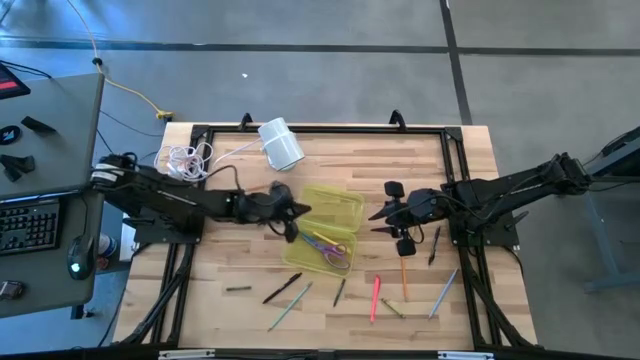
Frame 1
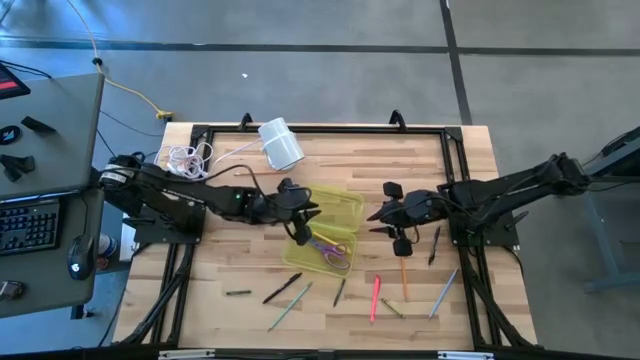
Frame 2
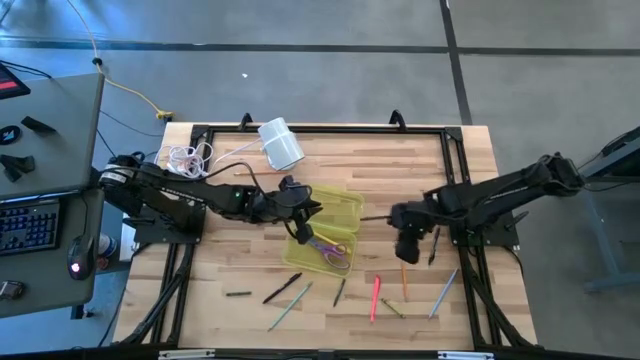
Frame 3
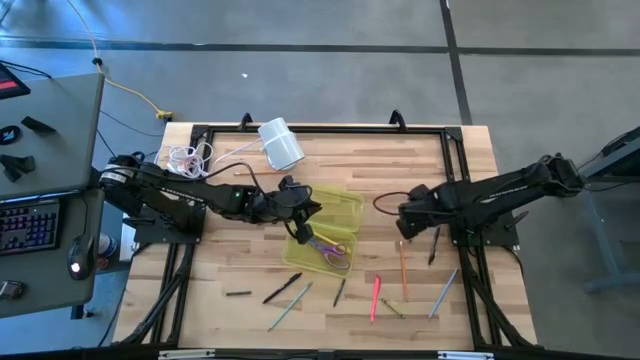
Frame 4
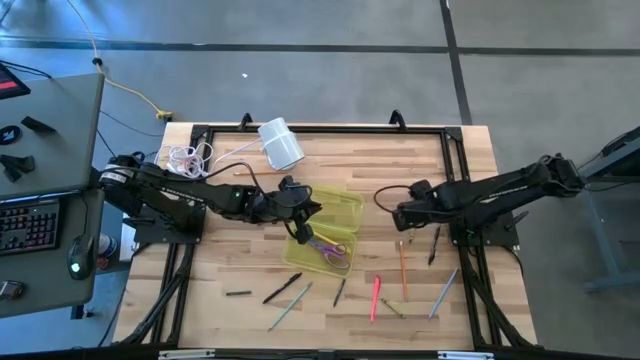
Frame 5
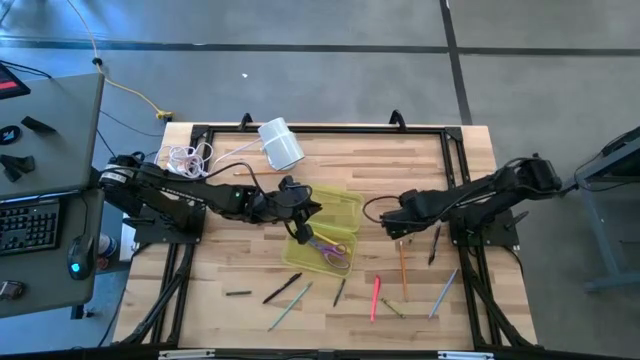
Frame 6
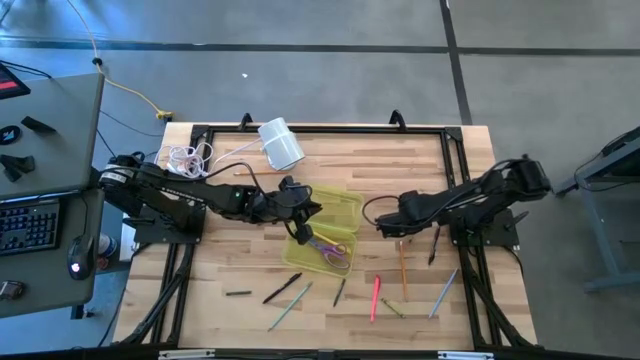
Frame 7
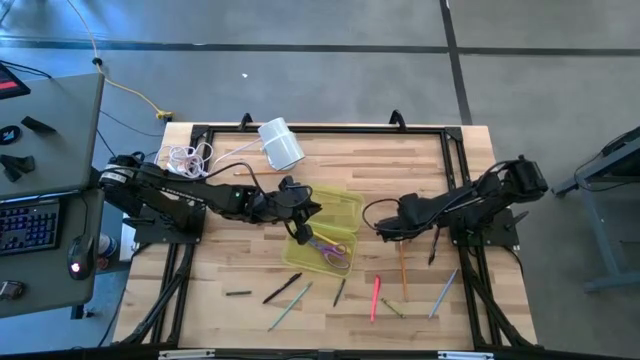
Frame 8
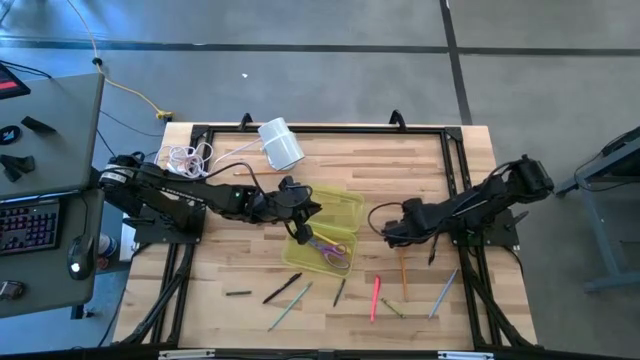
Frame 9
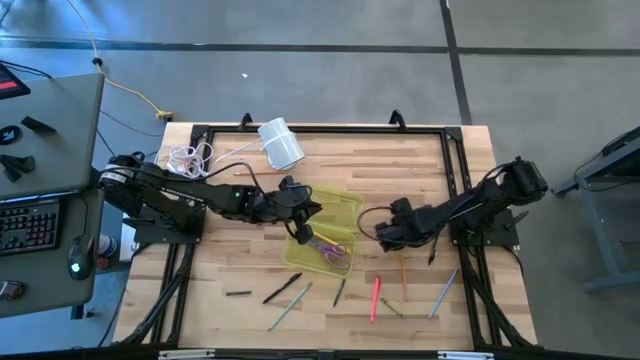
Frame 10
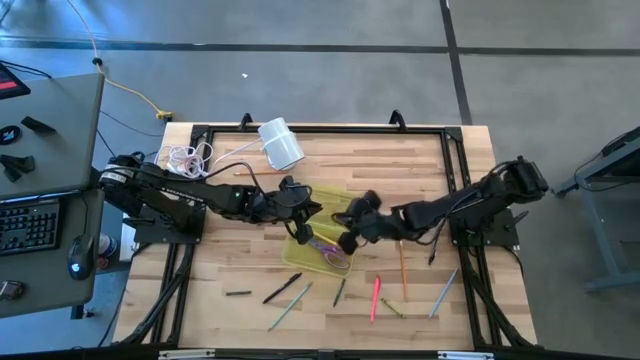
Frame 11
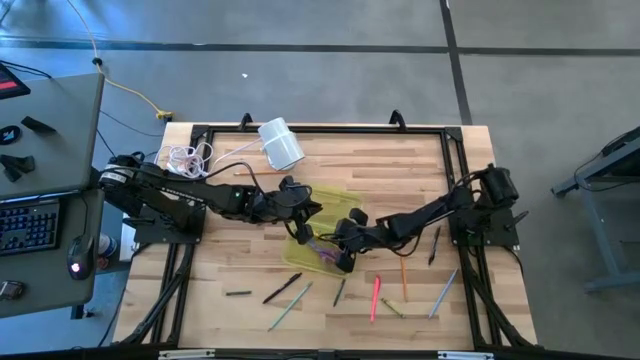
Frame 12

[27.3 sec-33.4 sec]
Task: Pick & place school supplies into a supply box
Put the top green crayon into the supply box

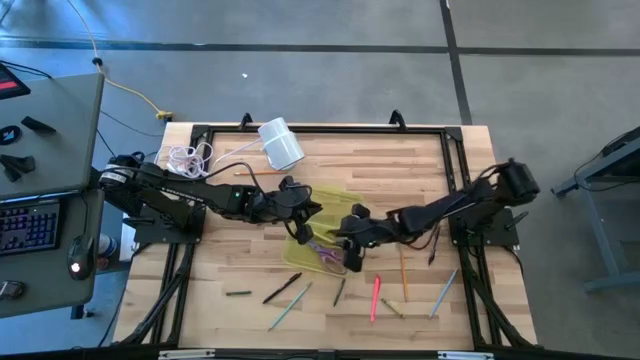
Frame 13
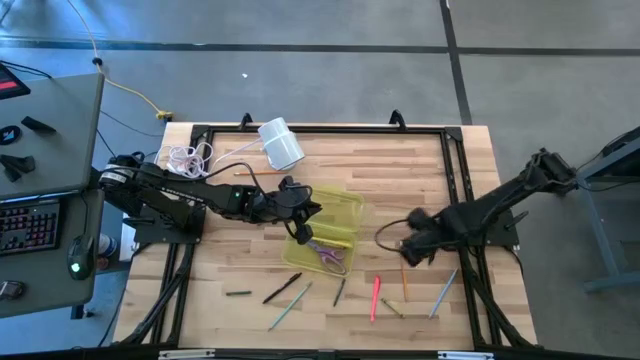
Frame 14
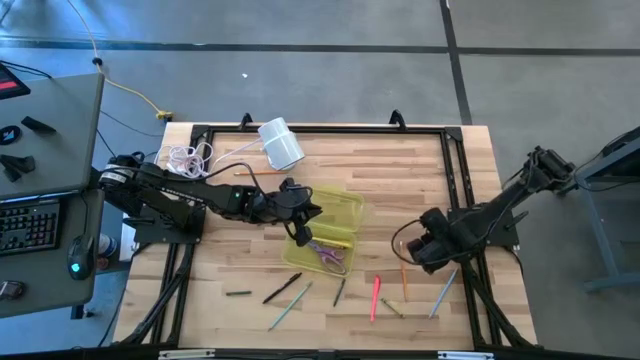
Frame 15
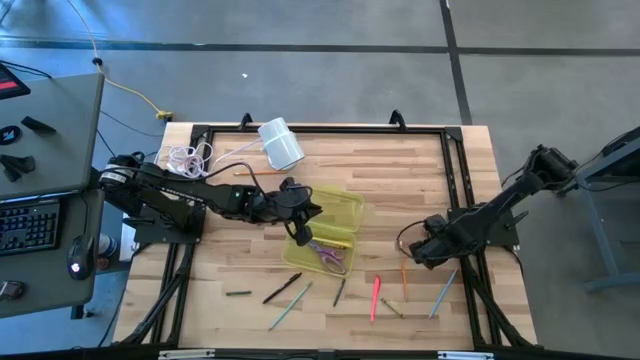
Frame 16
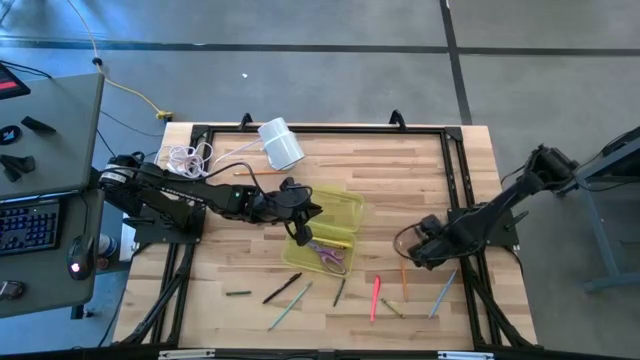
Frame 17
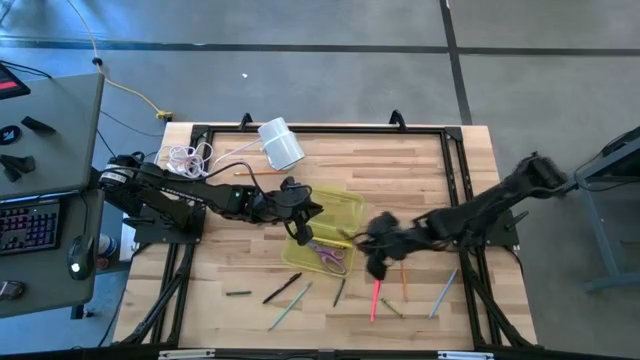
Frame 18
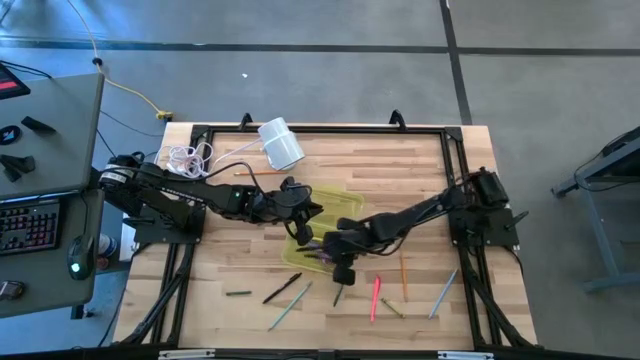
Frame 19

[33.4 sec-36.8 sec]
Put the right black pen into the supply box

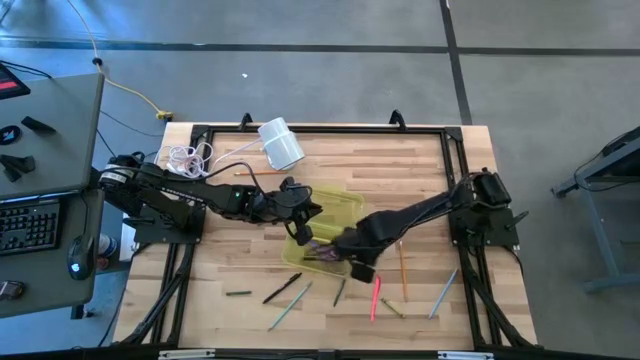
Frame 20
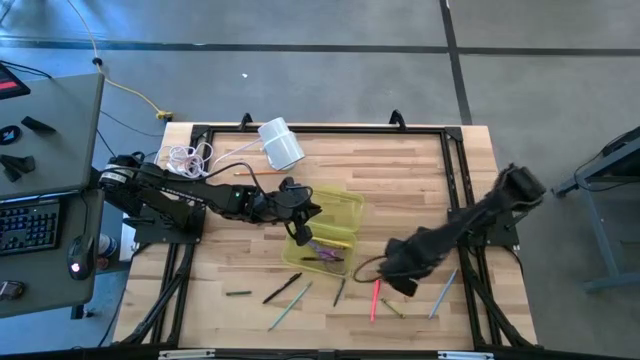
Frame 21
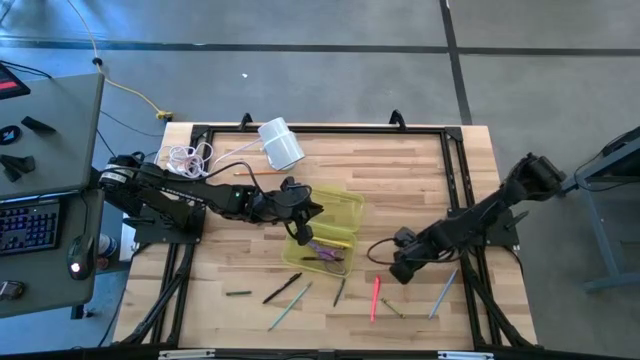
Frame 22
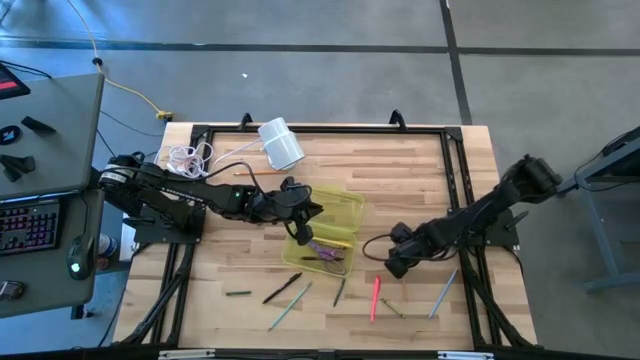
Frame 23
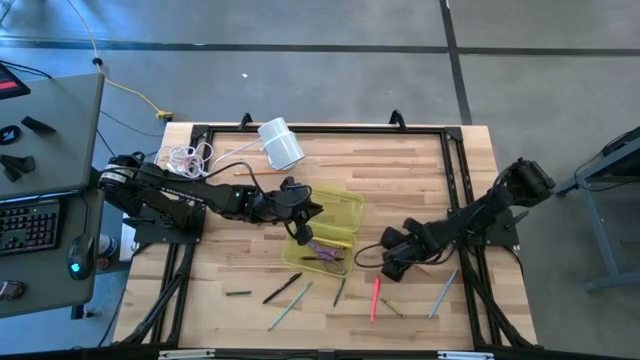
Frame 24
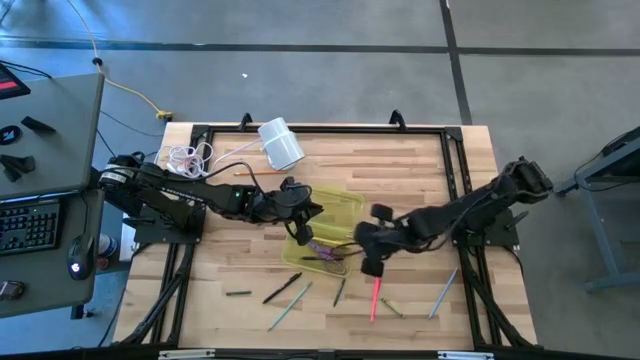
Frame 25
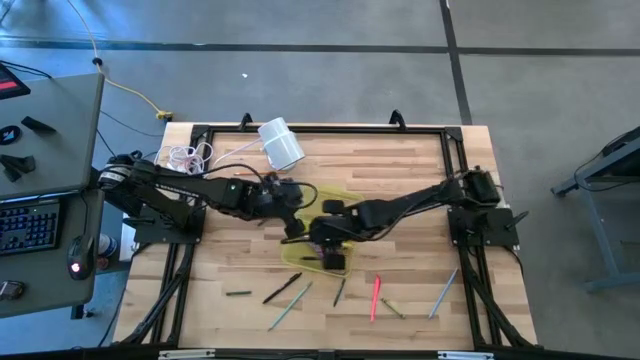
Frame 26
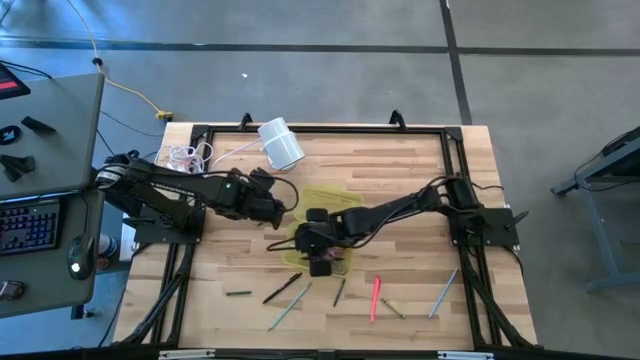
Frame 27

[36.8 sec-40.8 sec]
Put the bottom orange pencil into the supply box

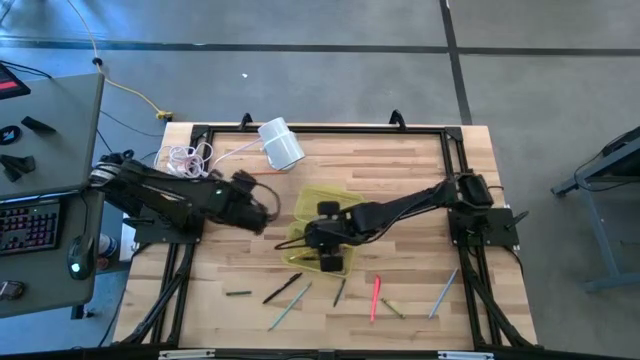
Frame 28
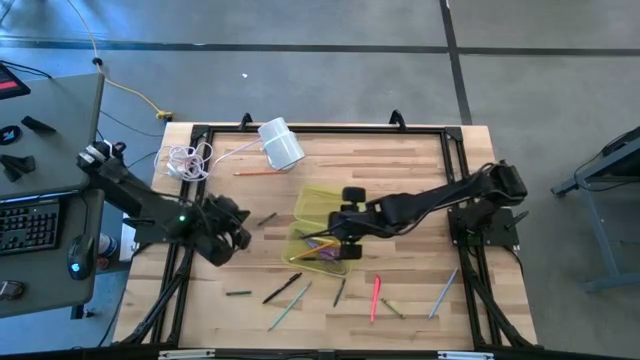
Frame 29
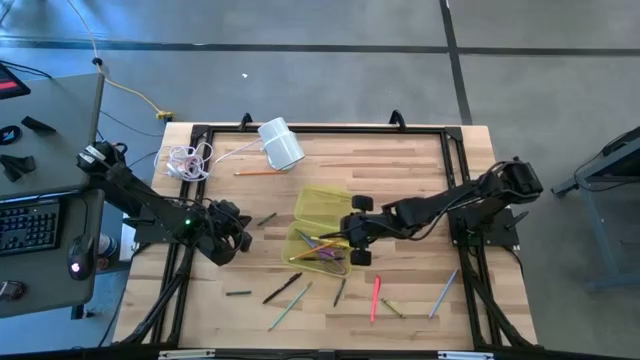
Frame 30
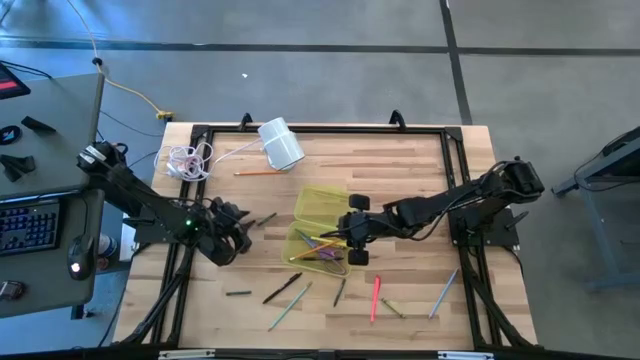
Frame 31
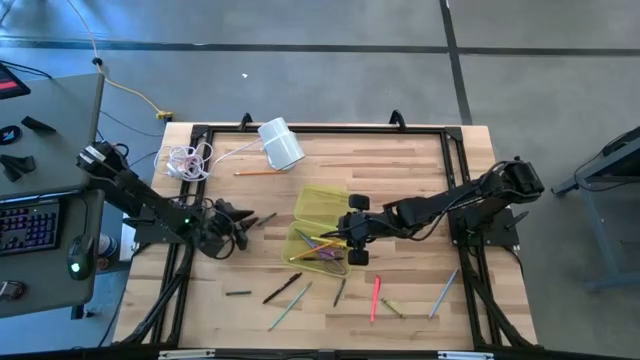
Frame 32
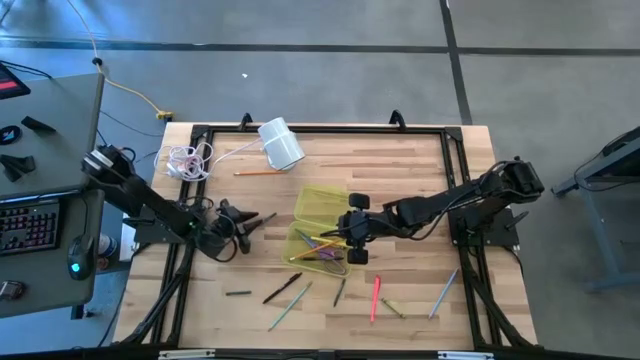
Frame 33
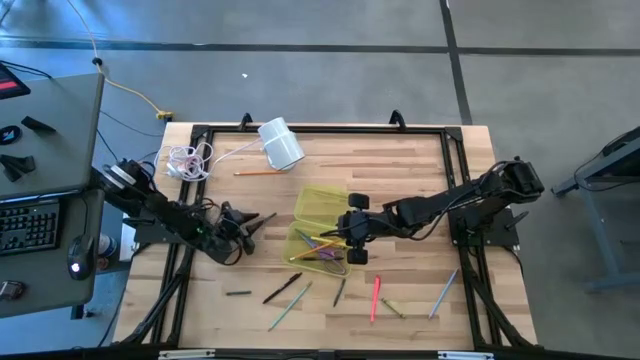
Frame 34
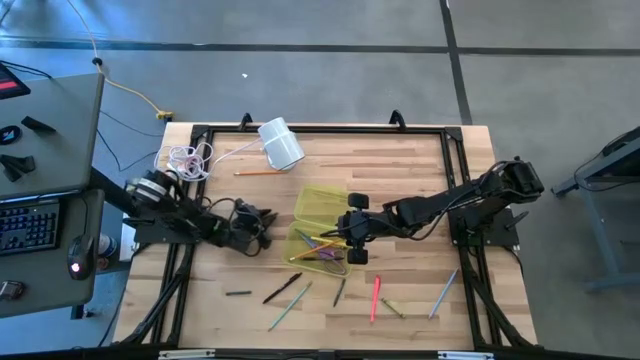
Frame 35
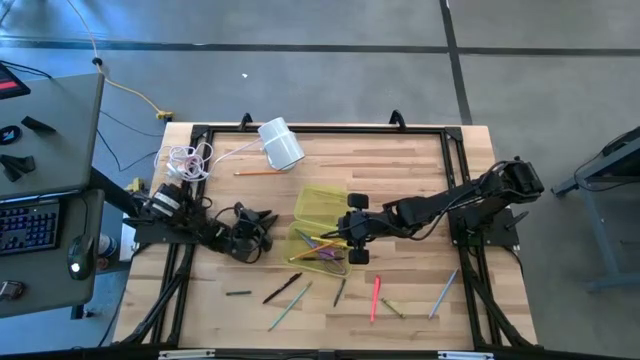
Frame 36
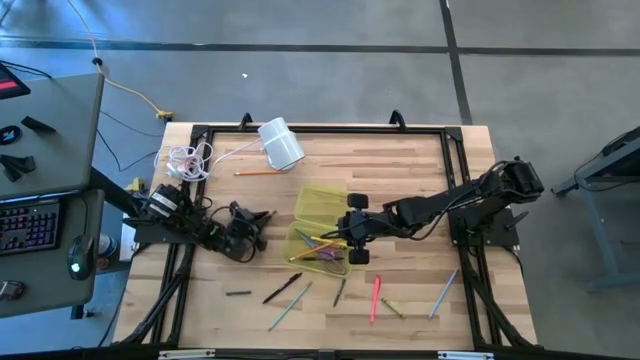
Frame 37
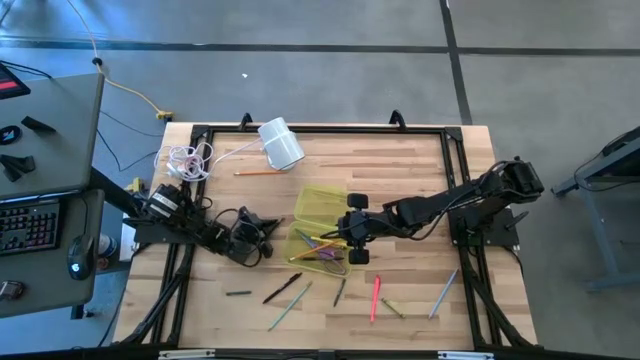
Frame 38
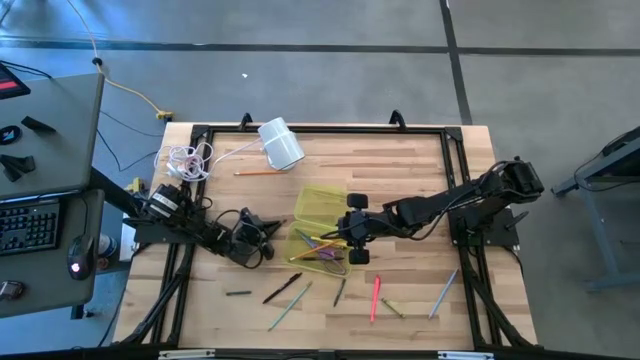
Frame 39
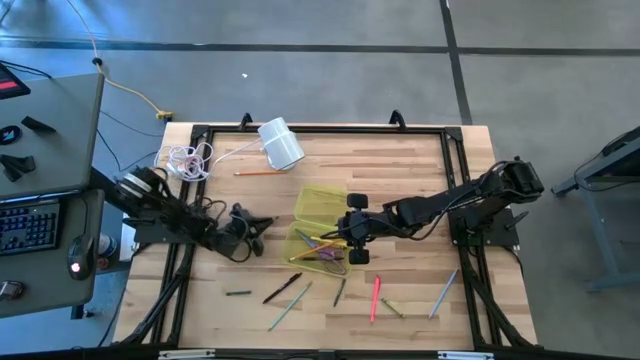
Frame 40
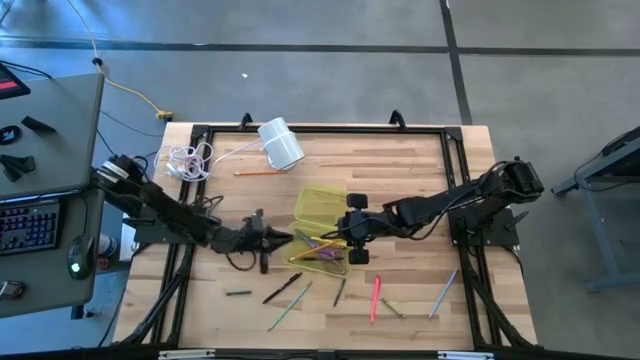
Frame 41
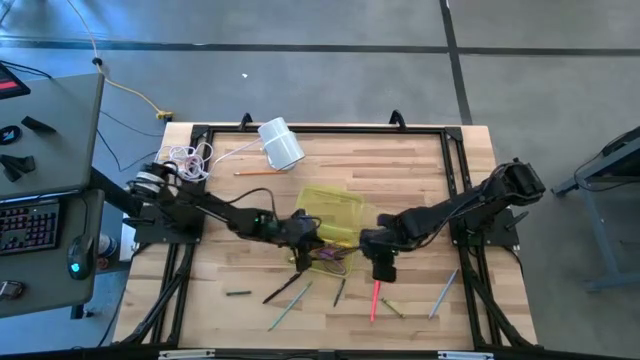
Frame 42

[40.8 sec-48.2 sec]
Put the top dark green crayon into the supply box

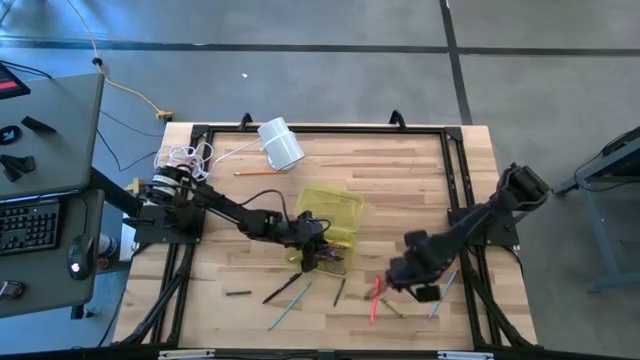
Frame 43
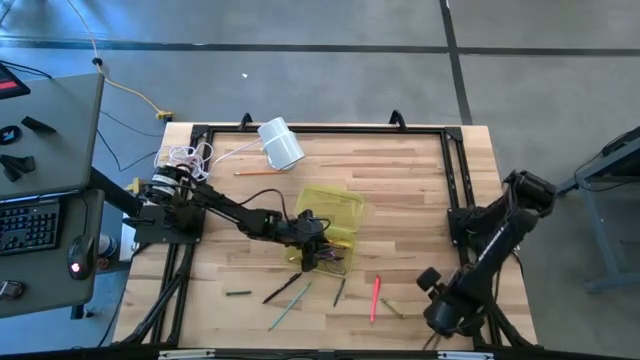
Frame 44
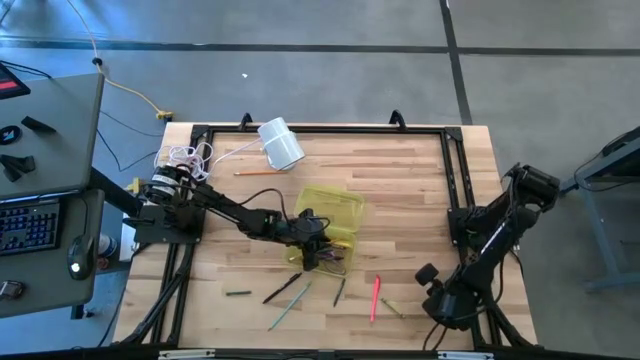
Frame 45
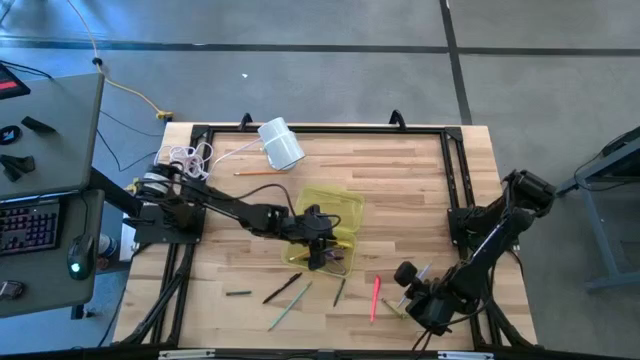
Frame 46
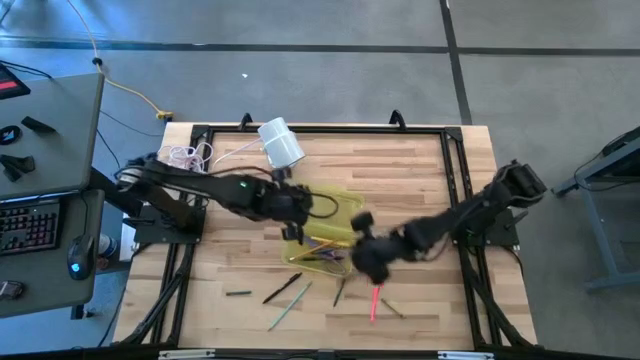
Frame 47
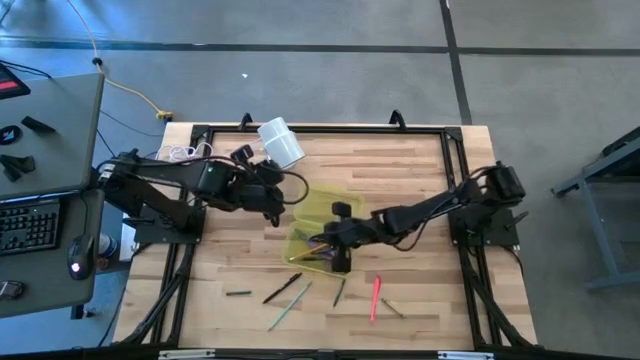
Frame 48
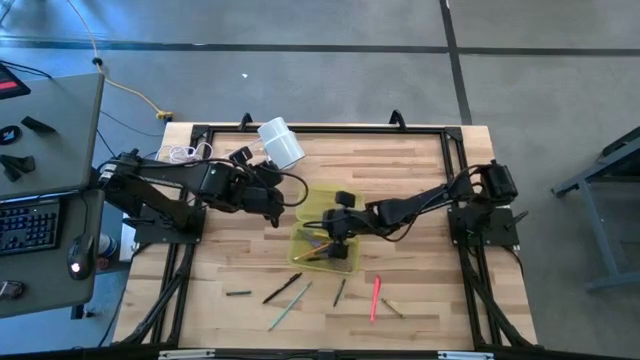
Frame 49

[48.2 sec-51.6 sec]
Put the light blue pencil into the supply box
